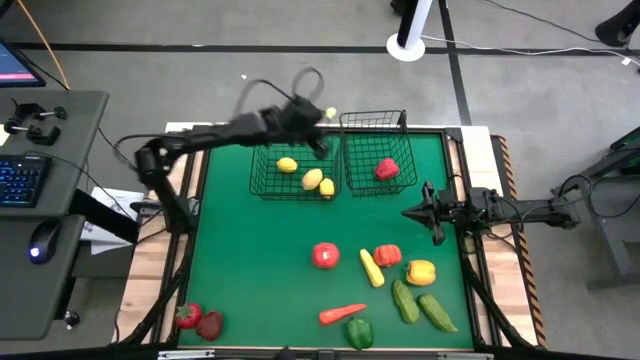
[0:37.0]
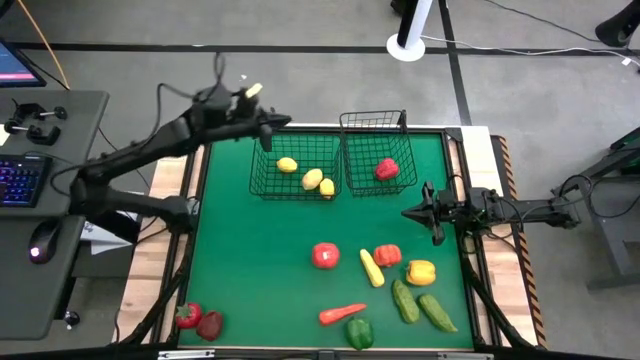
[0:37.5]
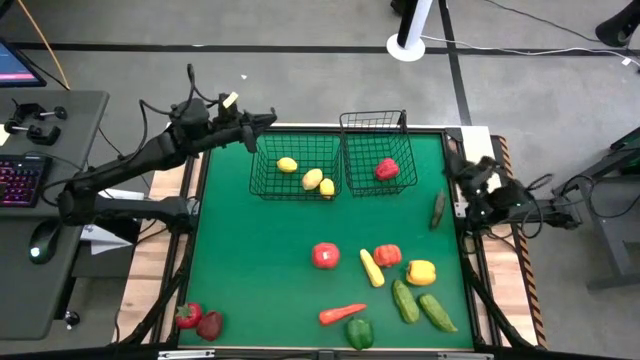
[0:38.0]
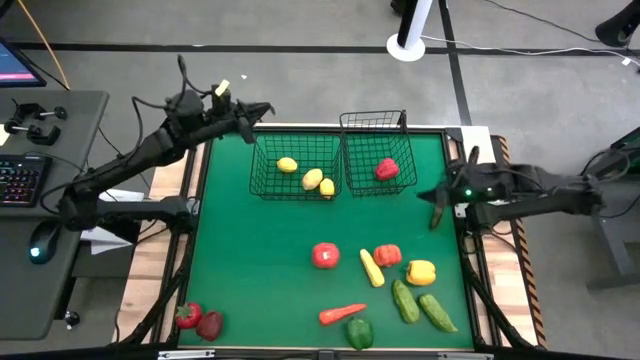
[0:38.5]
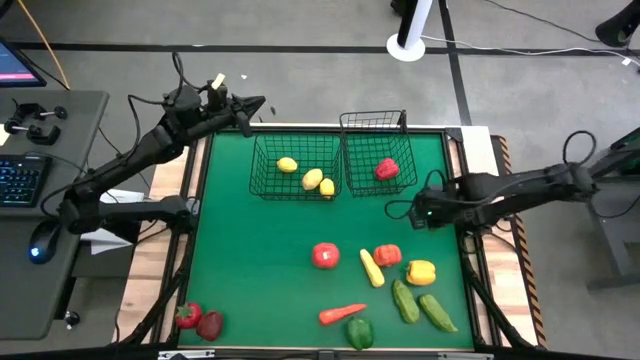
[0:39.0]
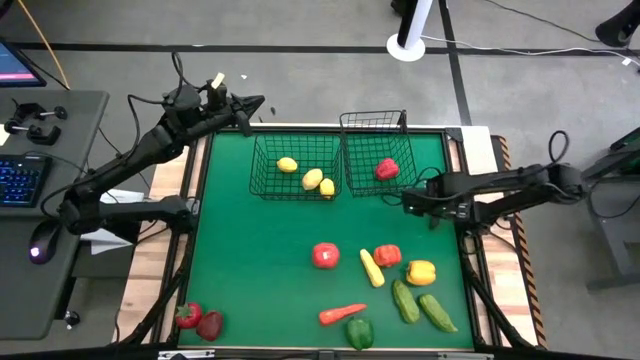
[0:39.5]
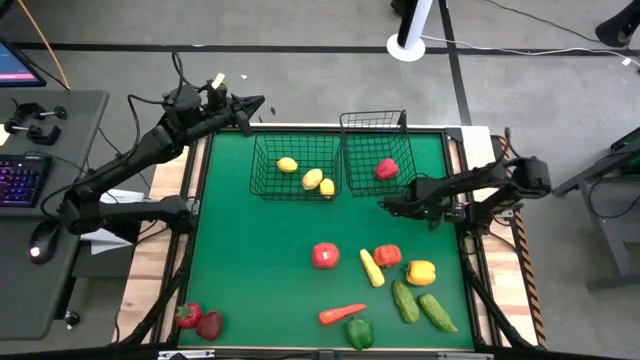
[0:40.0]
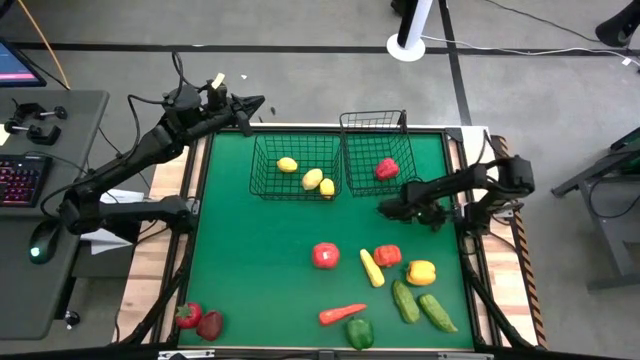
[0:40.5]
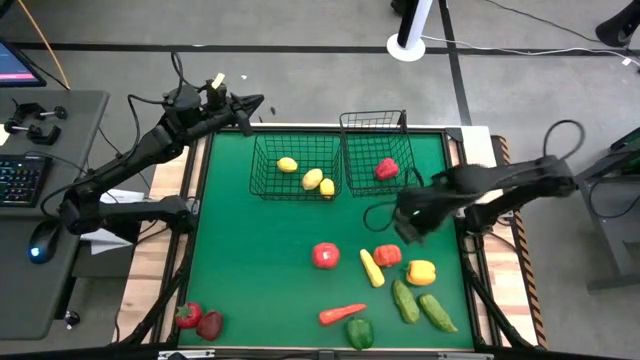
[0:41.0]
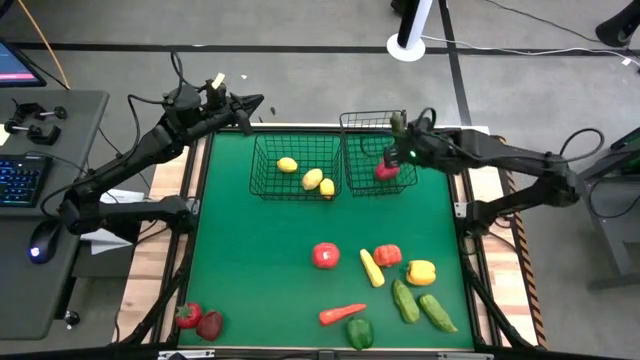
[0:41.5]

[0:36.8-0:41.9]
Task: Sort produce into baskets
Put the green chili pepper into the right wire basket

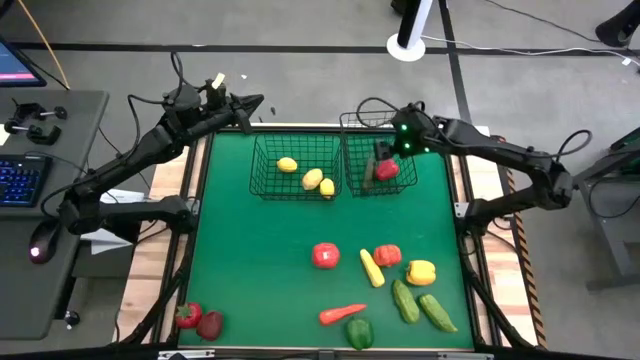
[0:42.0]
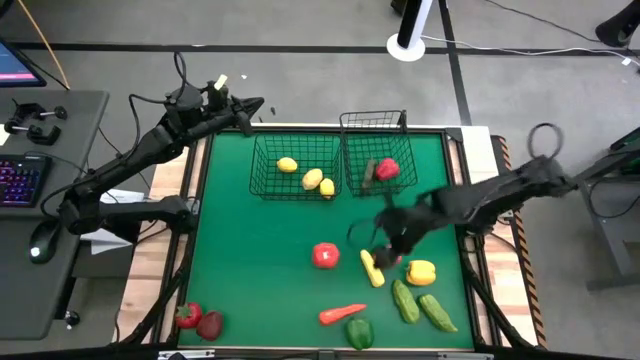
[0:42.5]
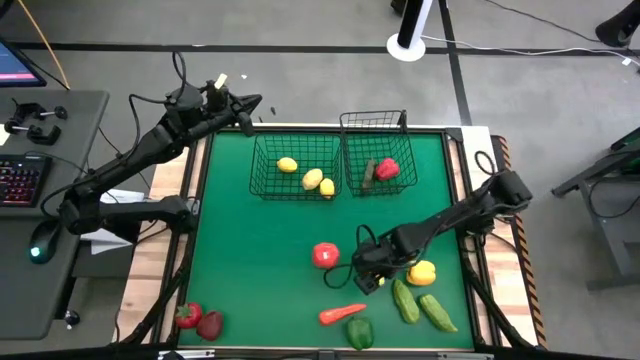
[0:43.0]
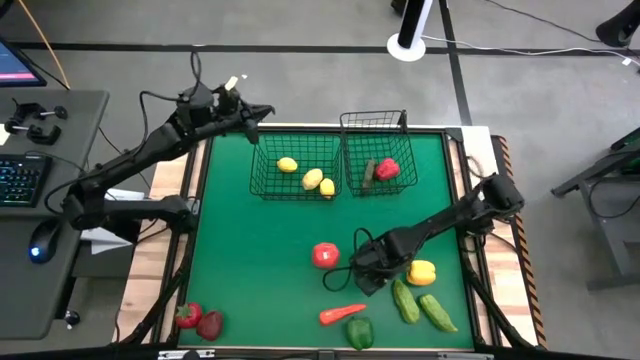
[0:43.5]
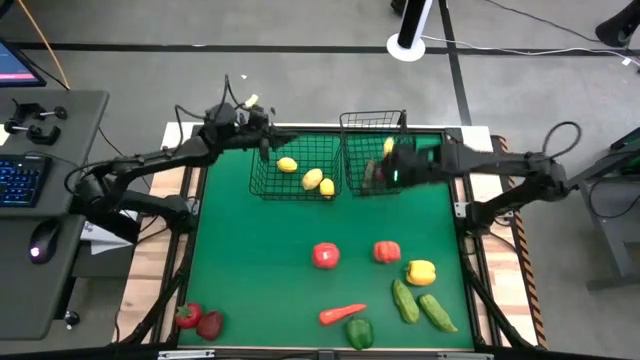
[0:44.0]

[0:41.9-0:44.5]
Put the yellow corn into the right wire basket

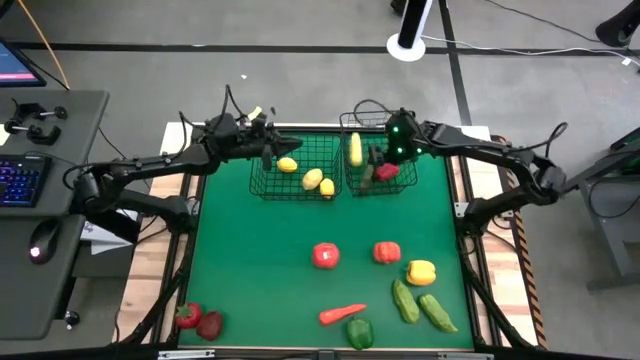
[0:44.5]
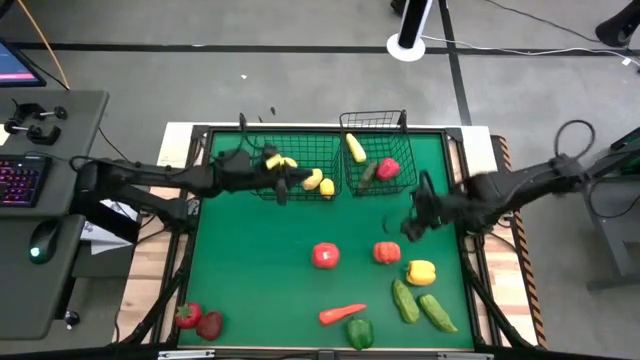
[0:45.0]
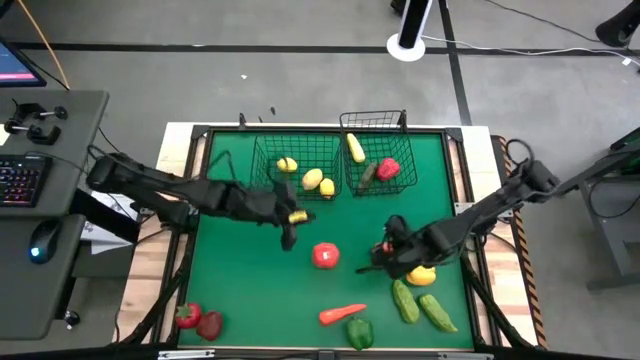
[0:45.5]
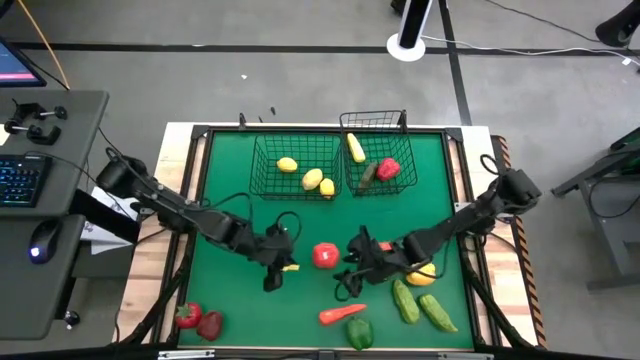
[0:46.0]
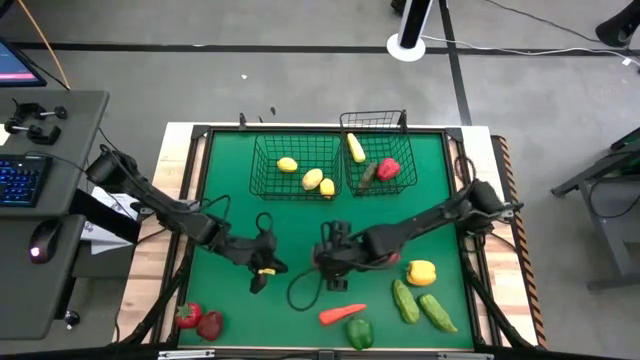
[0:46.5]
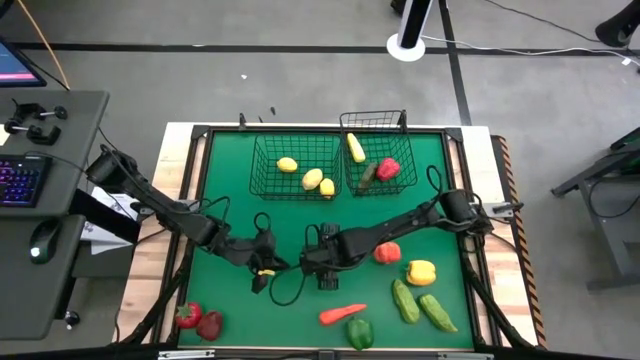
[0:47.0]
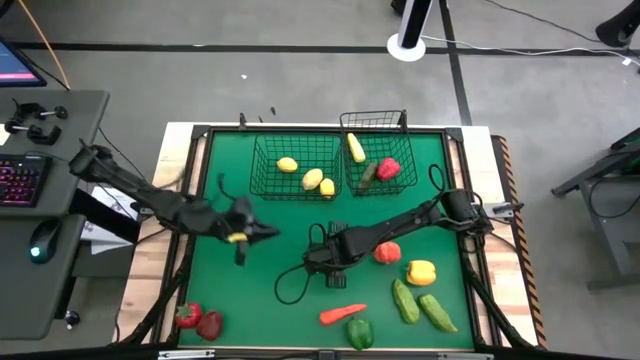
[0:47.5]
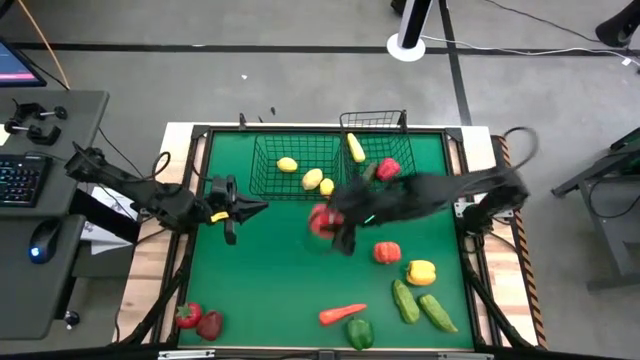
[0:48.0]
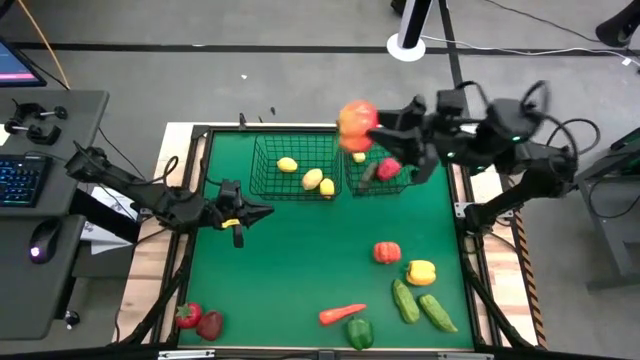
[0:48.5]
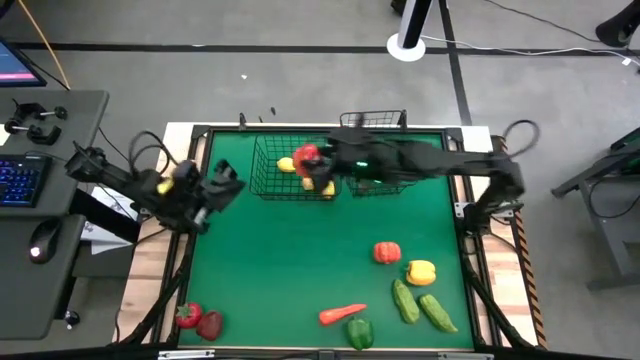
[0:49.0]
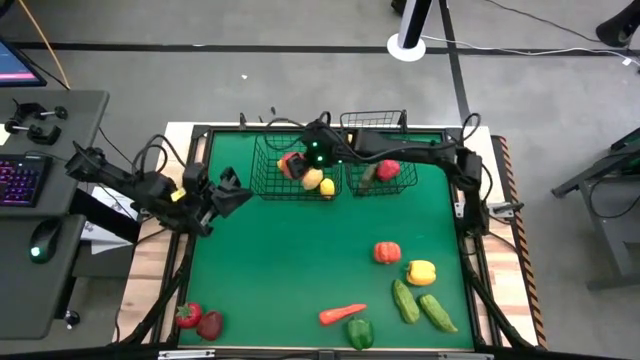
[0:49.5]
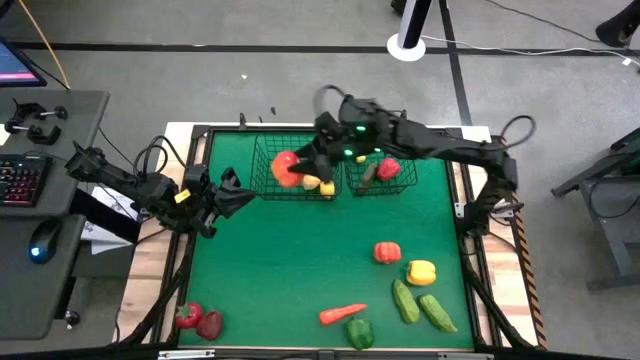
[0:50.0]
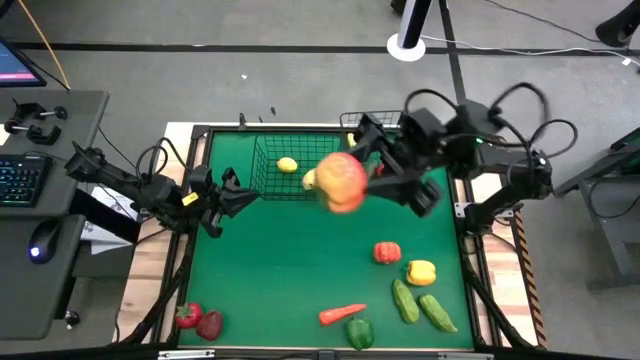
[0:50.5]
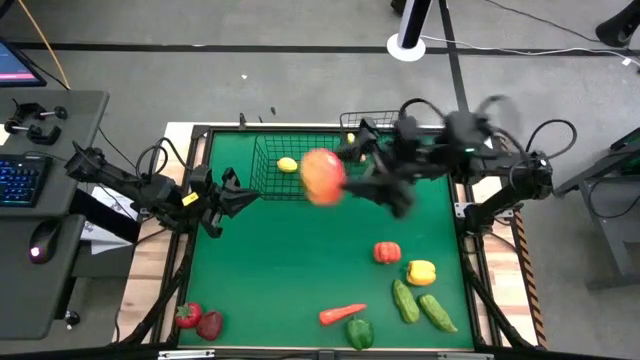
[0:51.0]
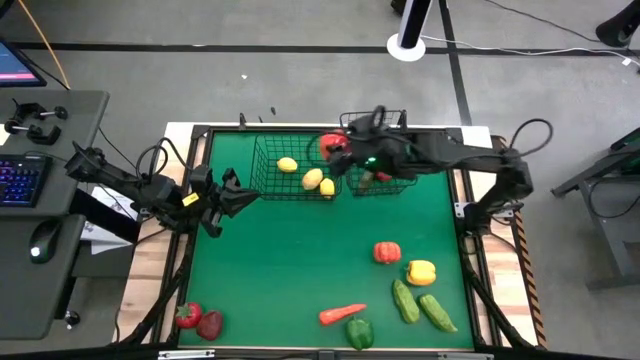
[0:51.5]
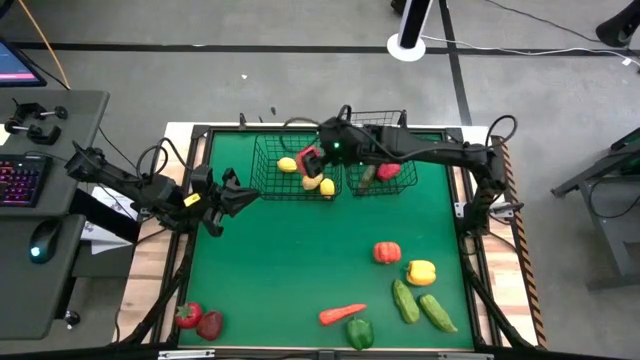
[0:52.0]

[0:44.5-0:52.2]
Put the top tomato into the left wire basket

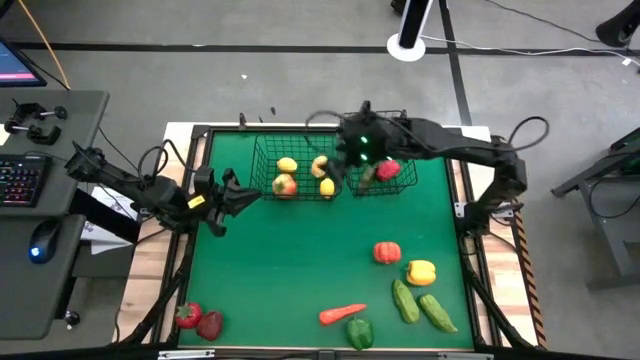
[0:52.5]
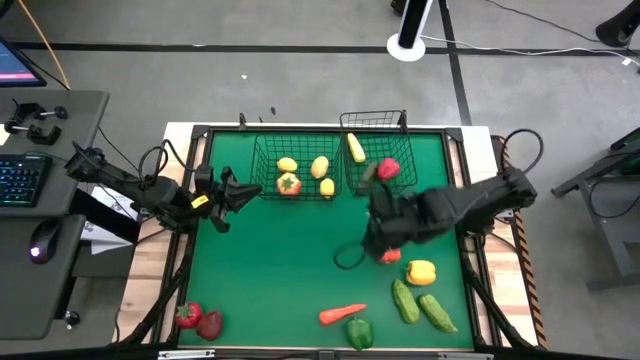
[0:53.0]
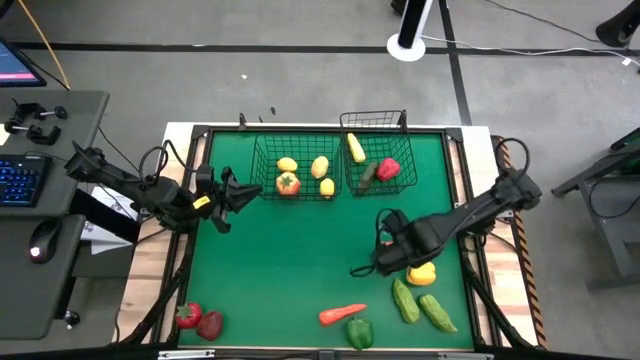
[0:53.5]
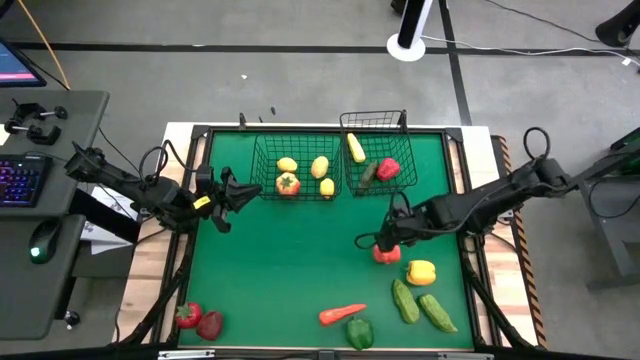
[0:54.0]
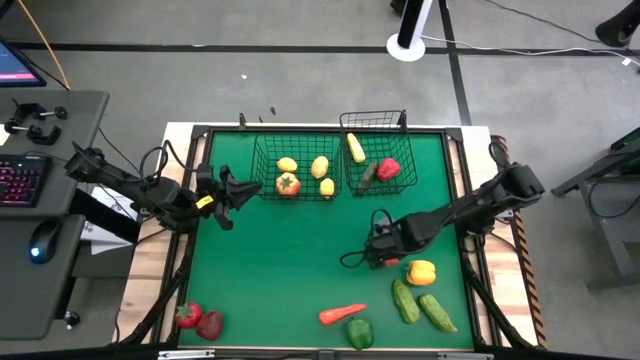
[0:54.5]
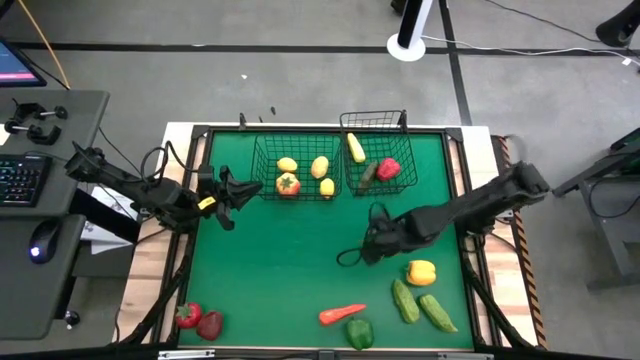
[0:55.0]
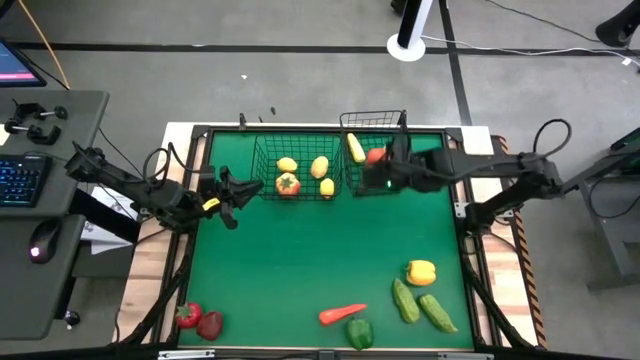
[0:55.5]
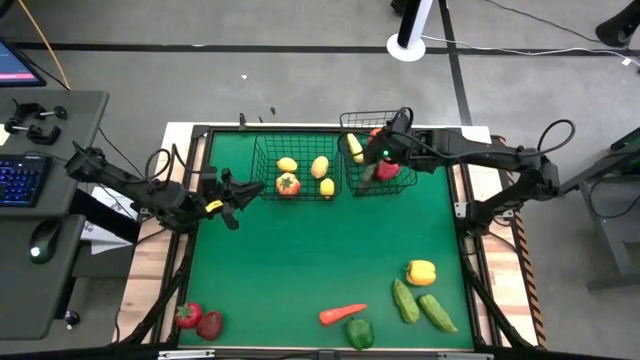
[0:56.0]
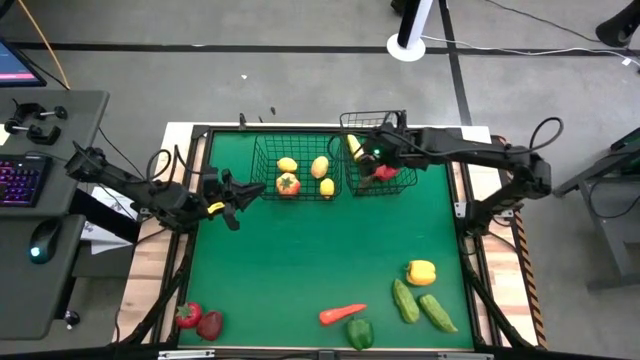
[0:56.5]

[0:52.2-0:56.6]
Put the orange bell pepper into the right wire basket

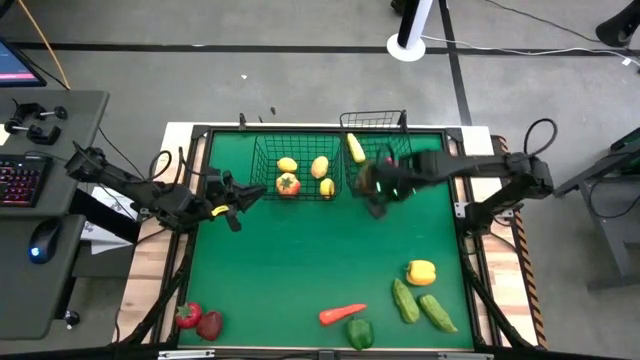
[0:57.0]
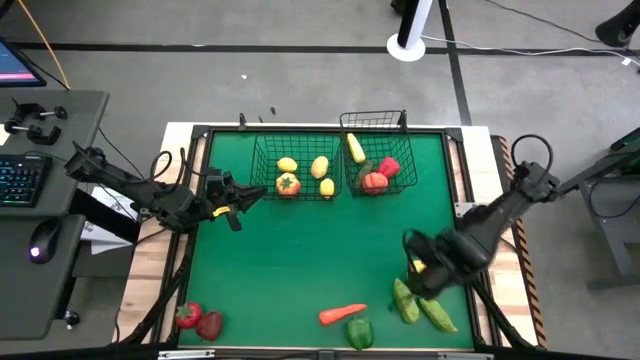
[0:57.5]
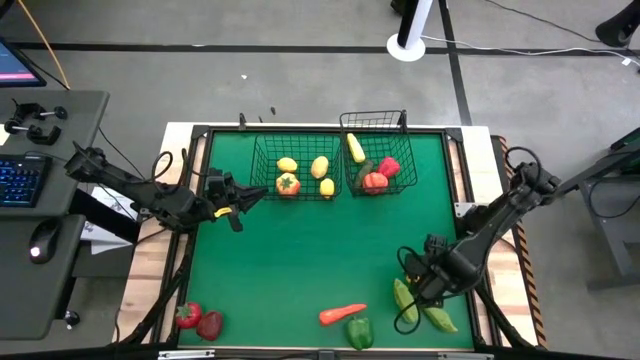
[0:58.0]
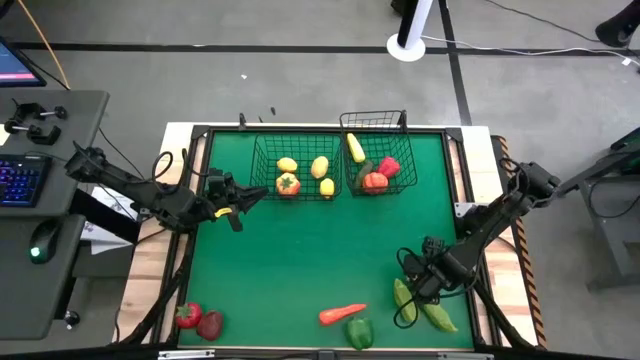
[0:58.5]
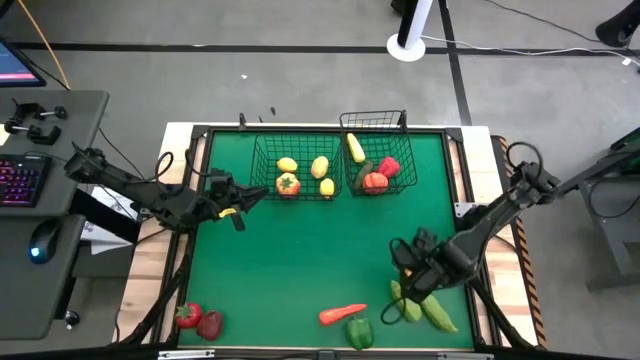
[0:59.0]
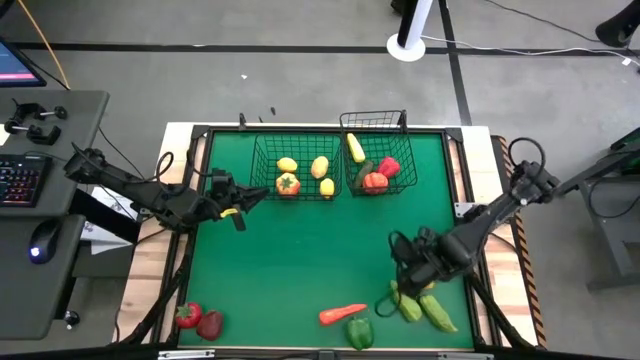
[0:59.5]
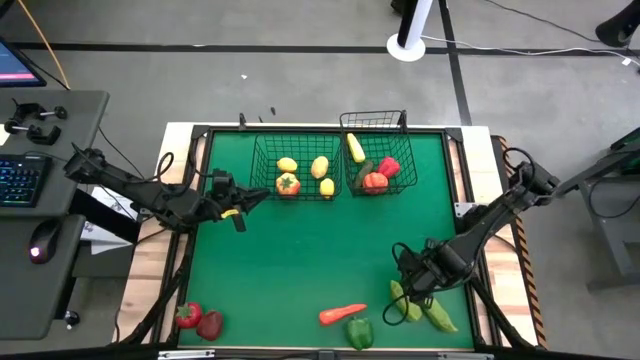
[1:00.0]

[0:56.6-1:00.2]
Put the yellow bell pepper into the right wire basket
